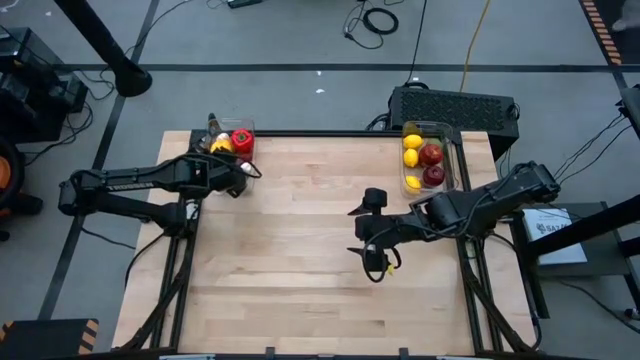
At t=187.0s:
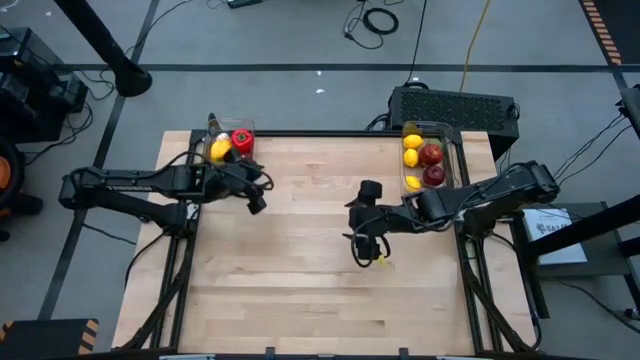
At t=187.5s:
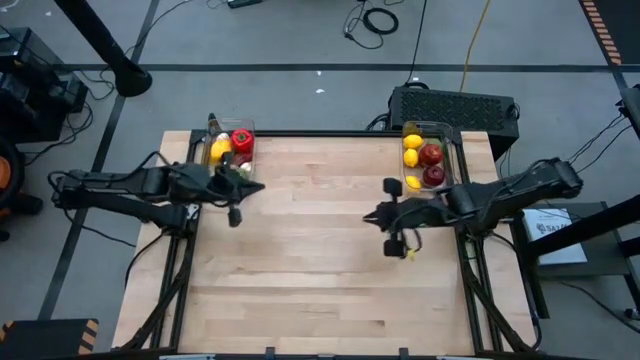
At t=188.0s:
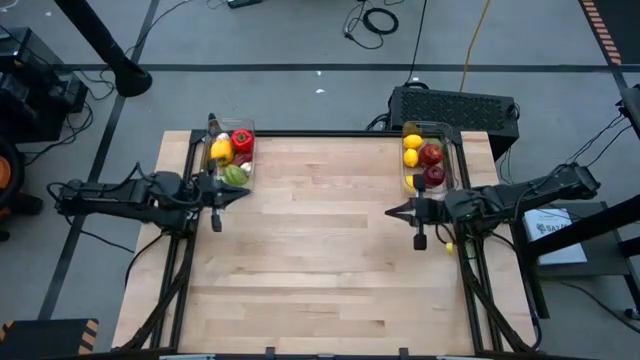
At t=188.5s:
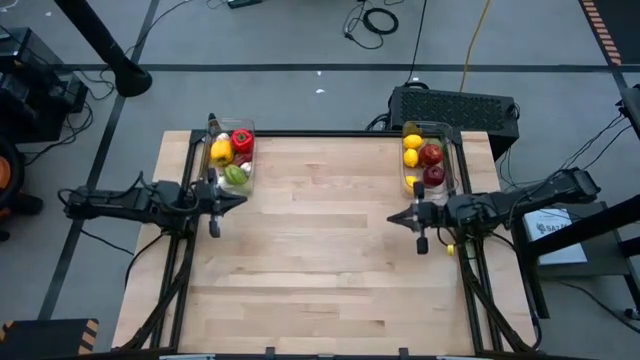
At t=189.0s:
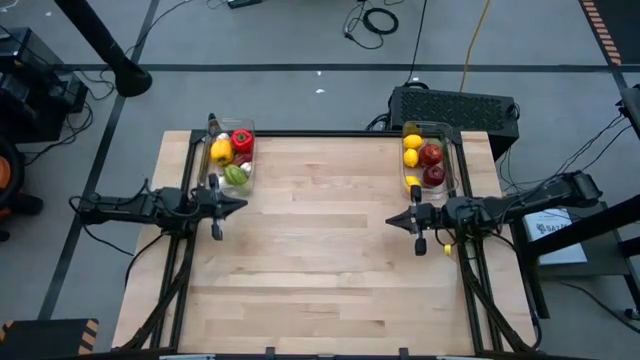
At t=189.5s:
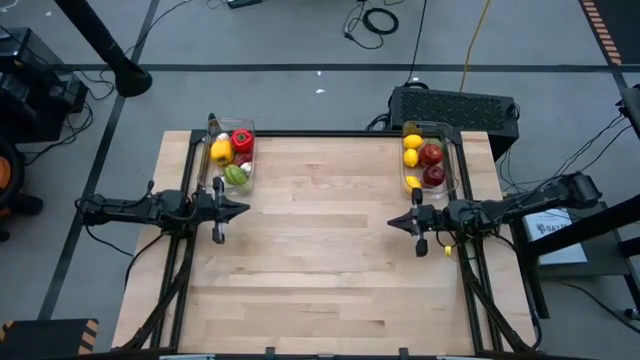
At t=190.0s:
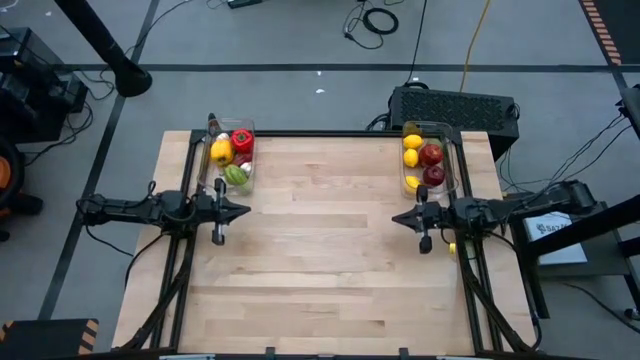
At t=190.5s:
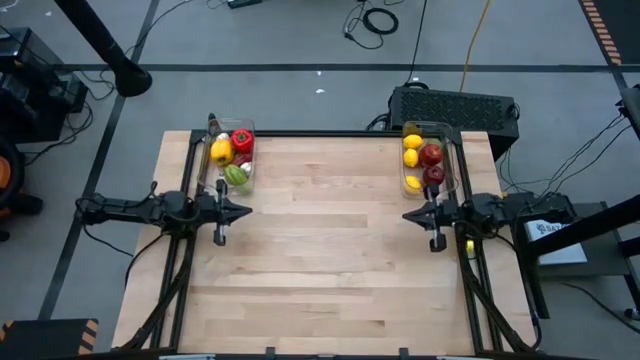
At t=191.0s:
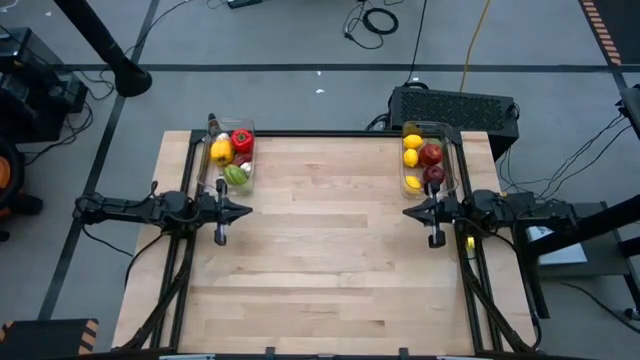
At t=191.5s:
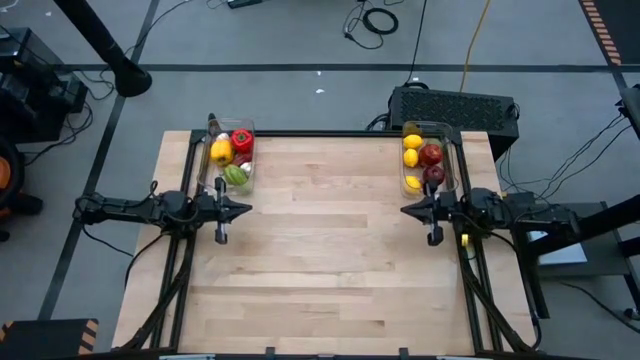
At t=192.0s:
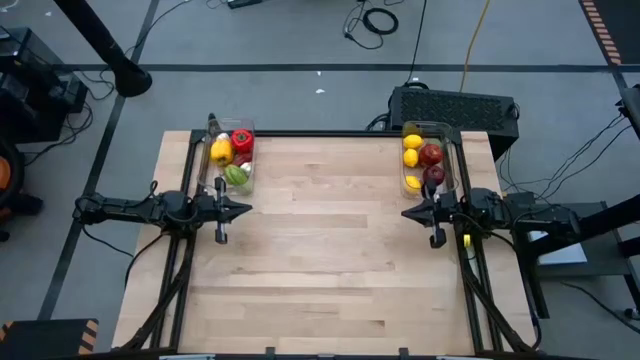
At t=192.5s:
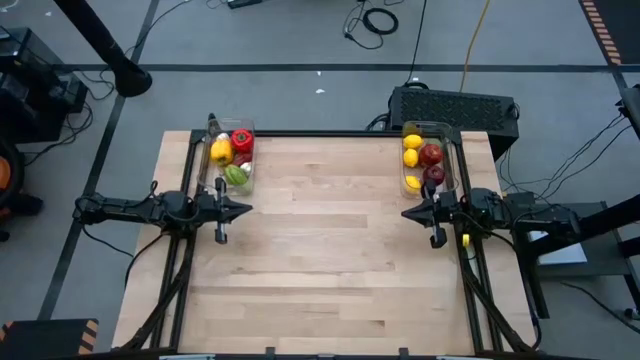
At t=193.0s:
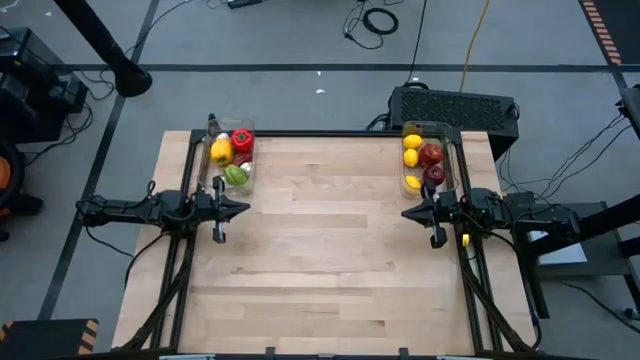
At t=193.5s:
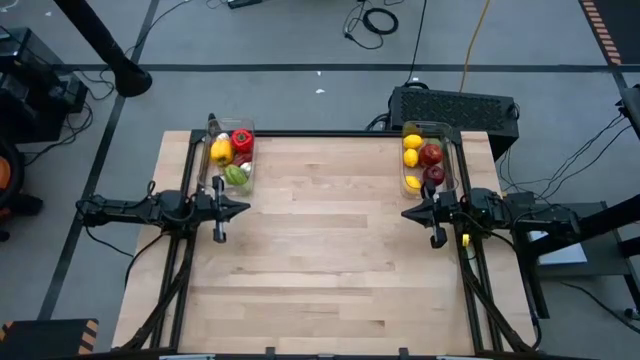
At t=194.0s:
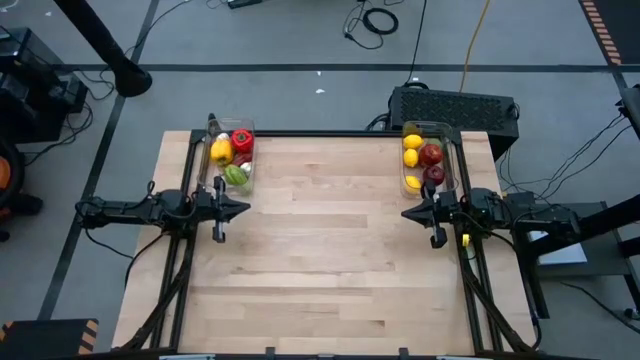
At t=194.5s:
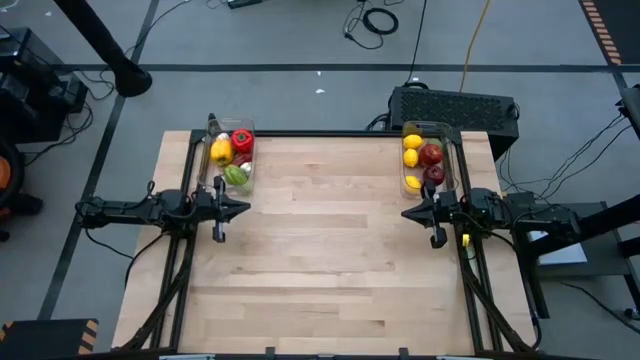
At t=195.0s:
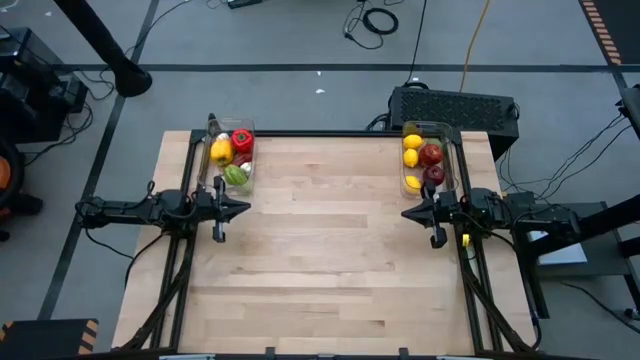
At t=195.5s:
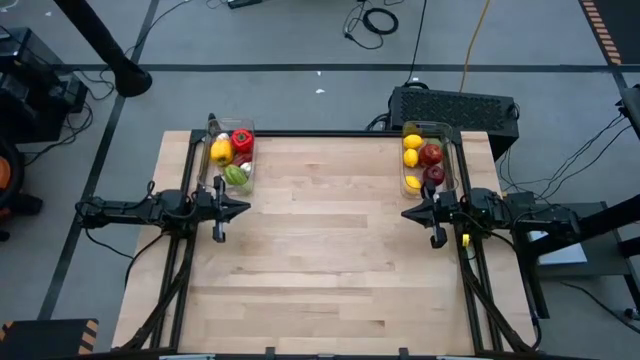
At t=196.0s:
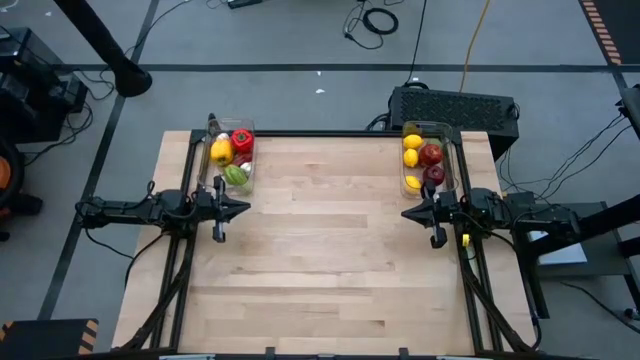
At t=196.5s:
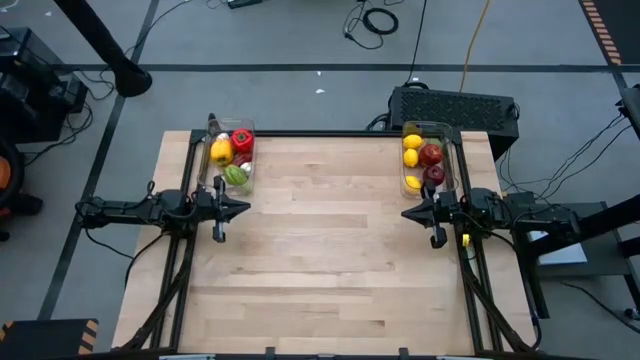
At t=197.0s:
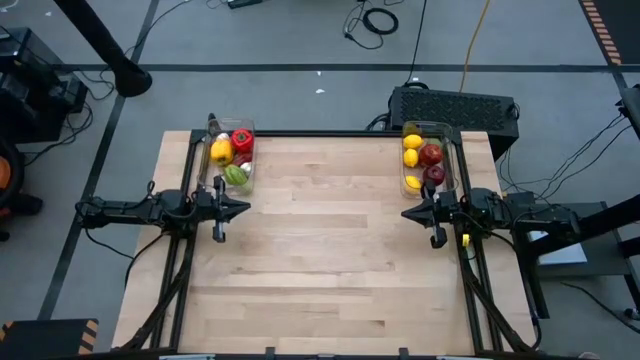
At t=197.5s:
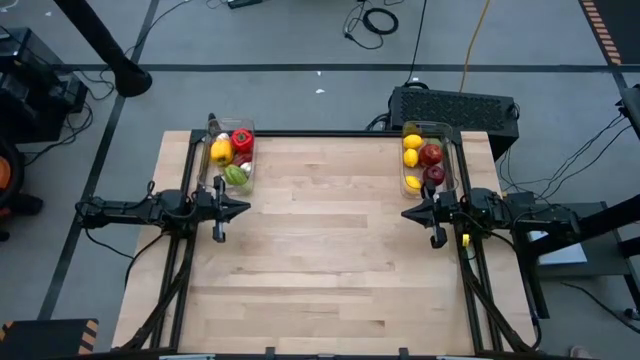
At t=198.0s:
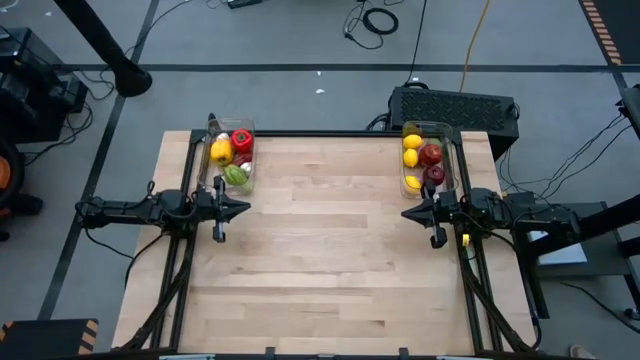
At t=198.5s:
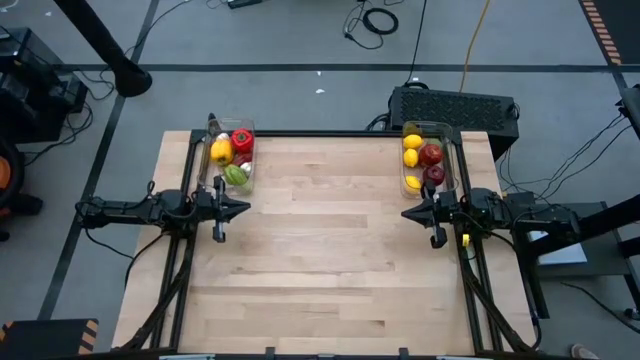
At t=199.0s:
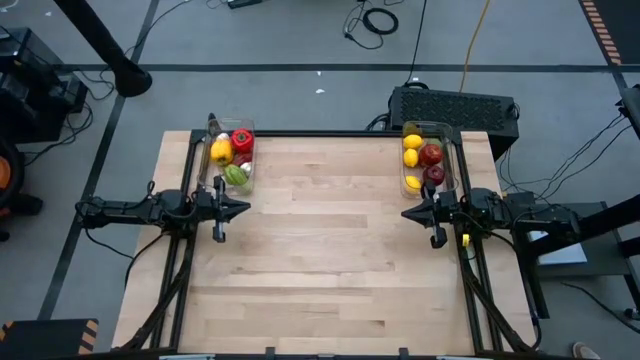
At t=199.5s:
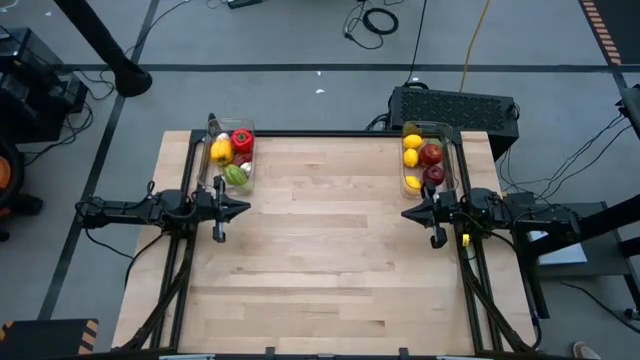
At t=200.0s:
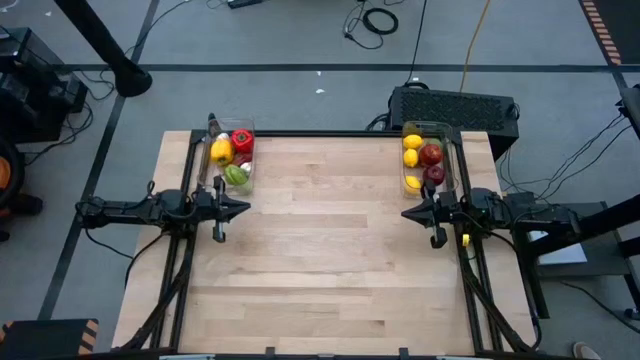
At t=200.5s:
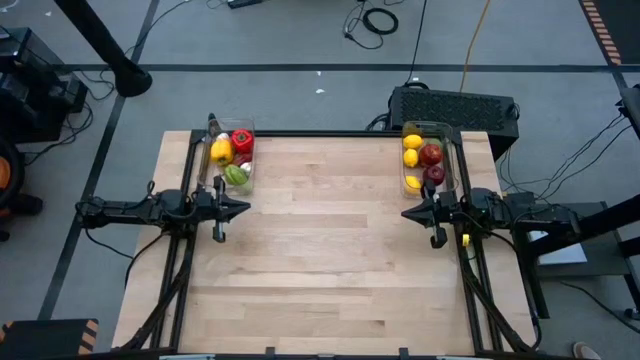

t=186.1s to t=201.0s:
Task: Sort produce into baskets
Return to Home Position

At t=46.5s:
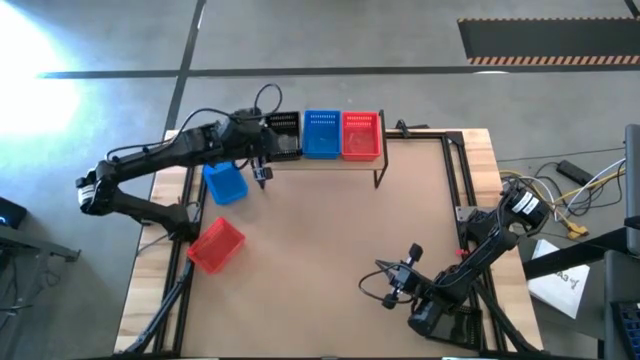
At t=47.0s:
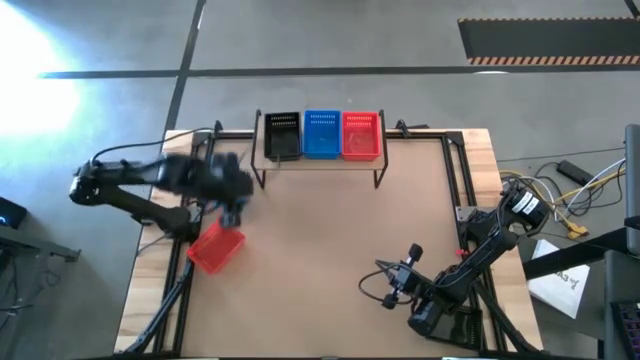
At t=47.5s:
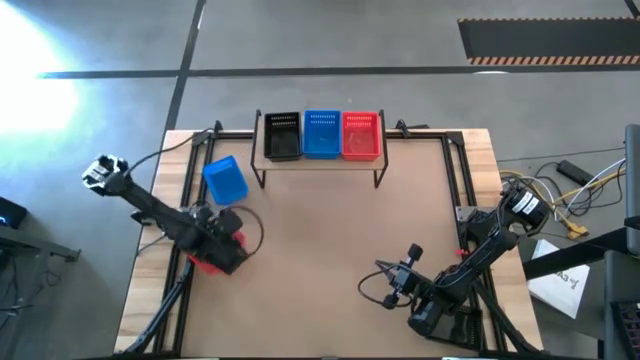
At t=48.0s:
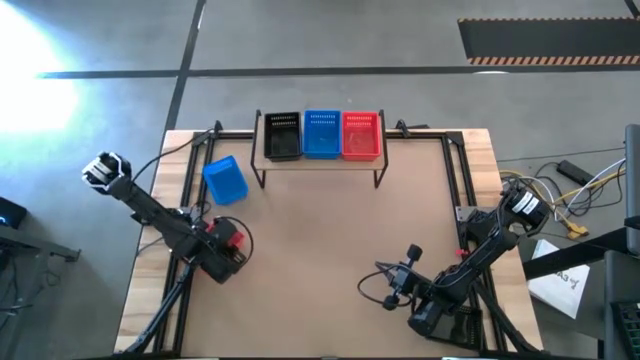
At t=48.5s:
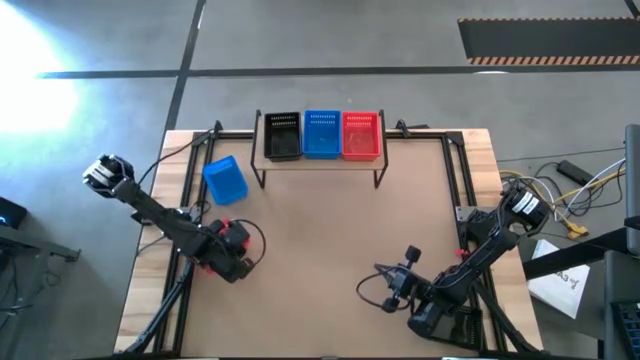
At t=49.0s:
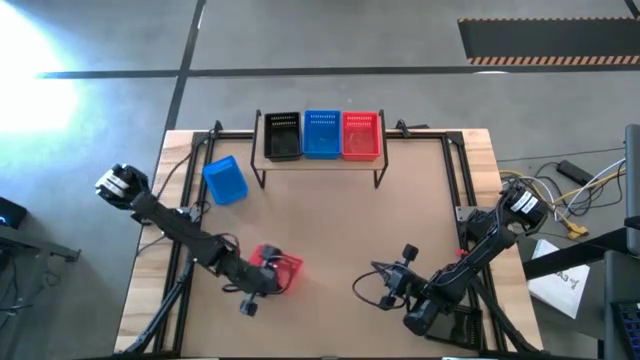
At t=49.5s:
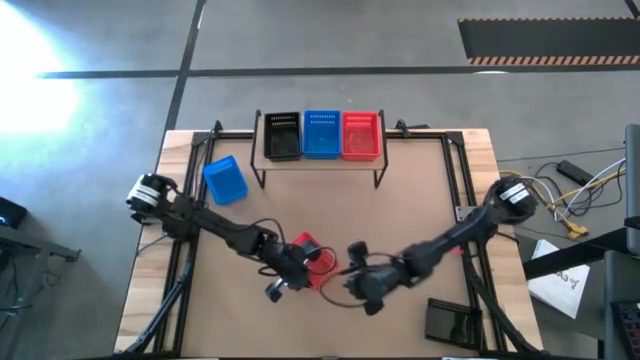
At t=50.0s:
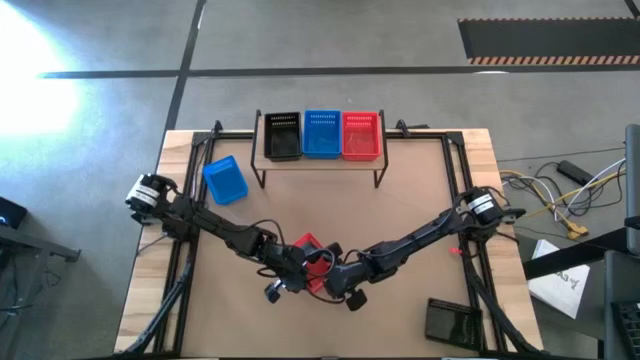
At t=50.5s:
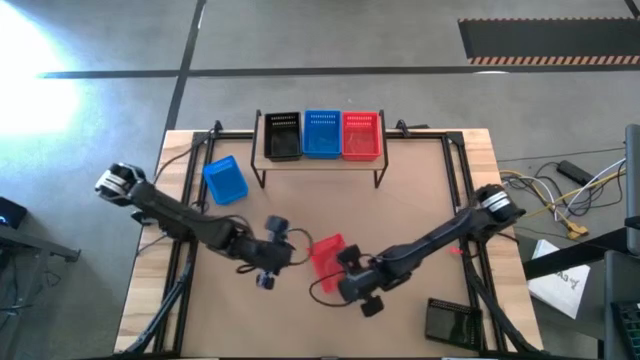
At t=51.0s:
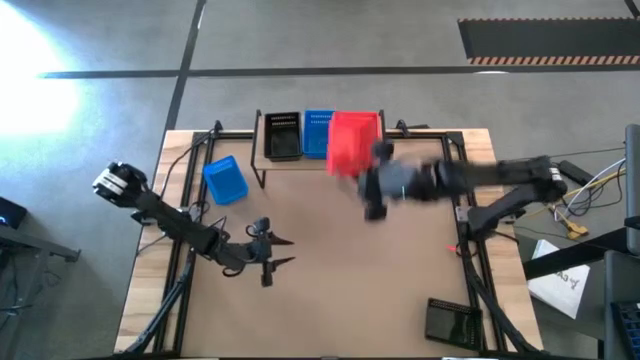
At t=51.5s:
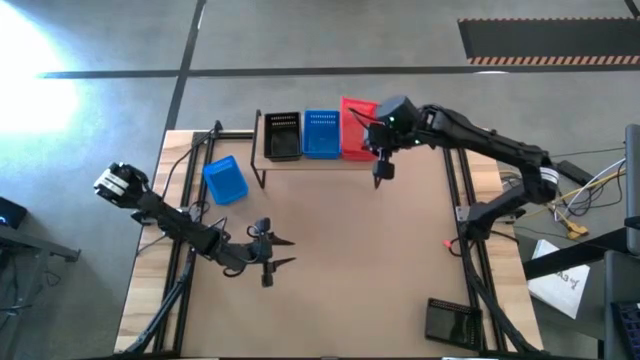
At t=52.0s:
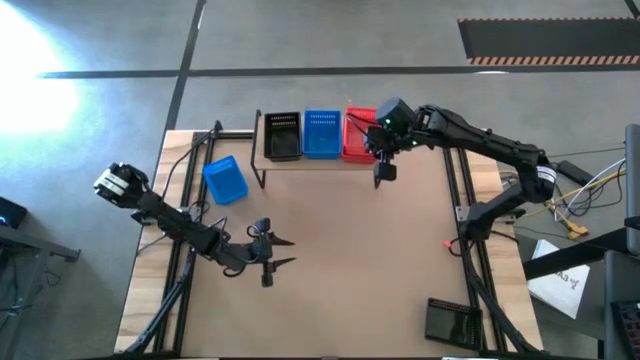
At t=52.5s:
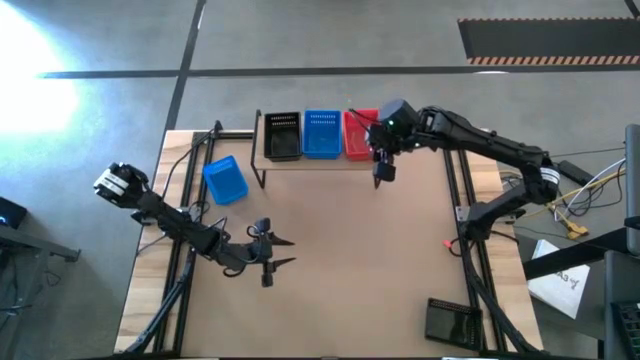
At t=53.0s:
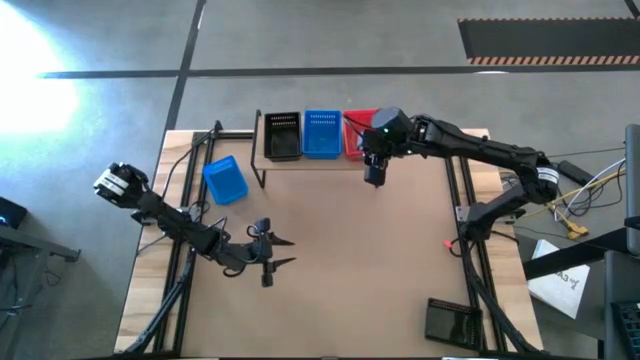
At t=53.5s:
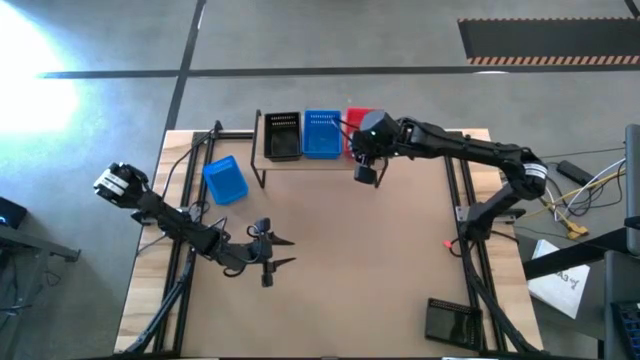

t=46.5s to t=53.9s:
Task: Stack baskets on shelf by color
Stack the red bin on the red bins on the shelf
